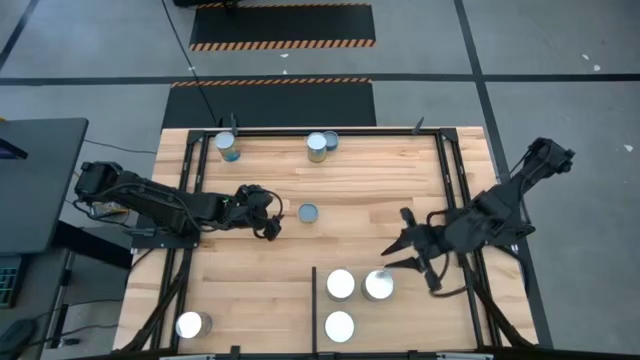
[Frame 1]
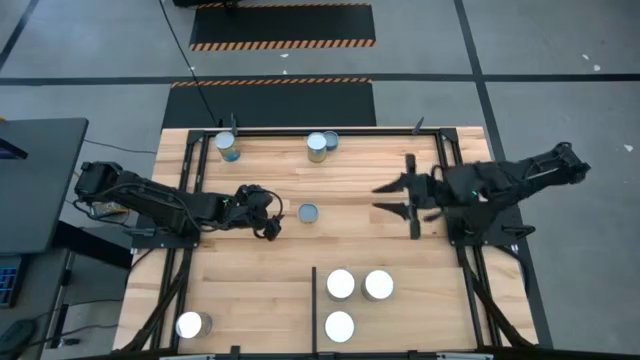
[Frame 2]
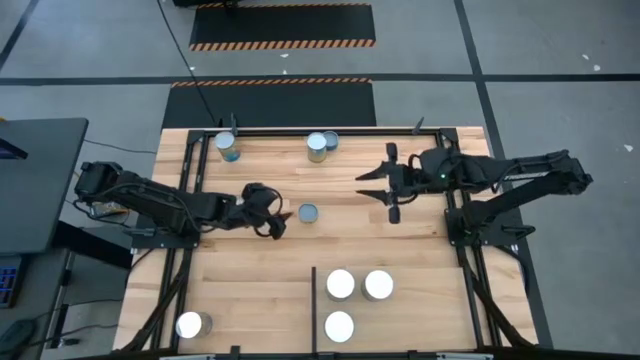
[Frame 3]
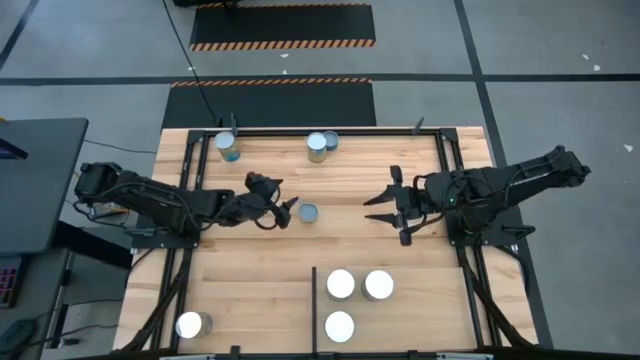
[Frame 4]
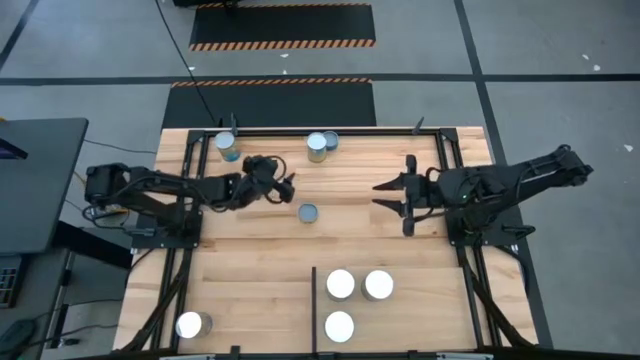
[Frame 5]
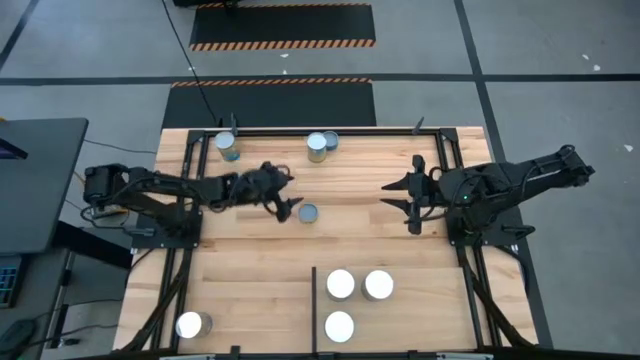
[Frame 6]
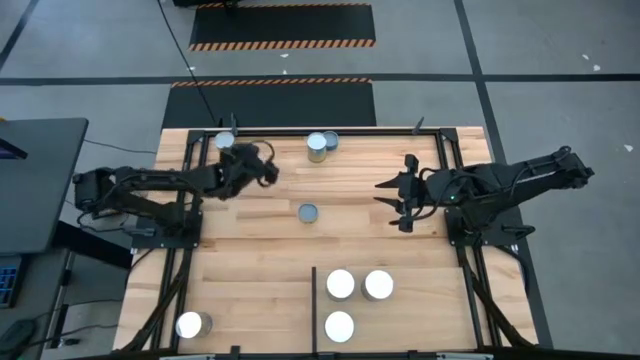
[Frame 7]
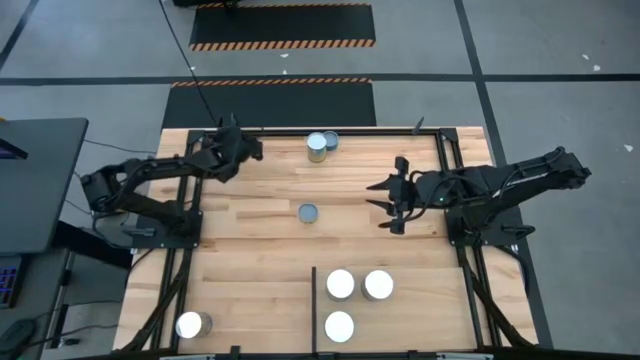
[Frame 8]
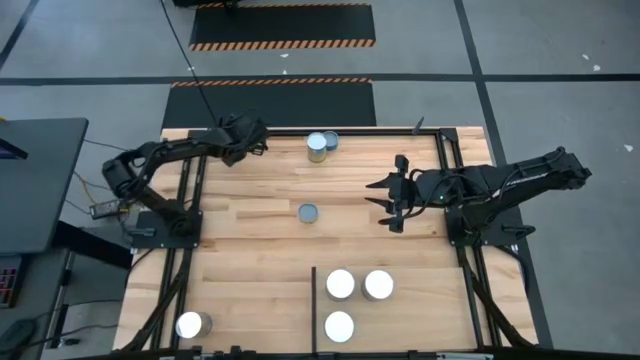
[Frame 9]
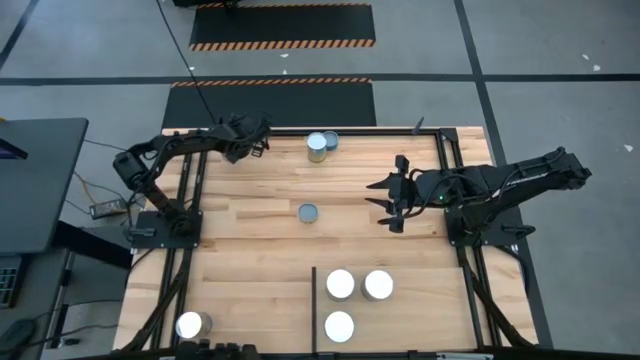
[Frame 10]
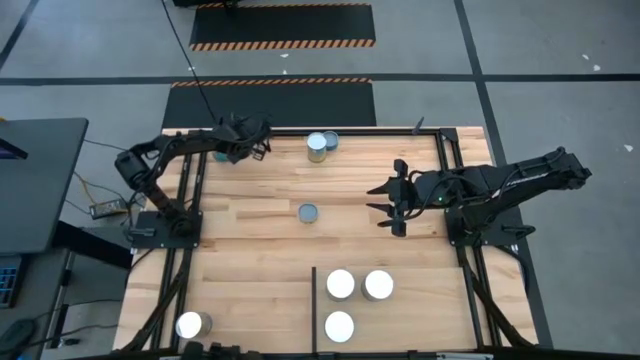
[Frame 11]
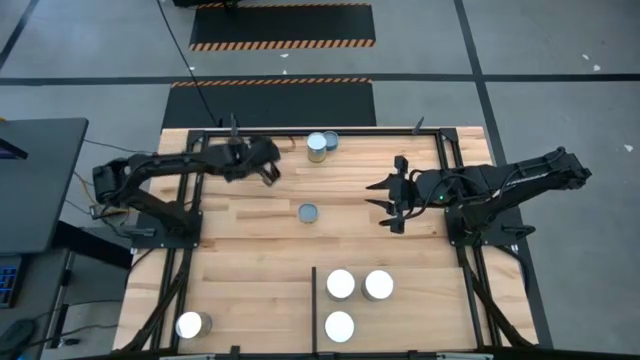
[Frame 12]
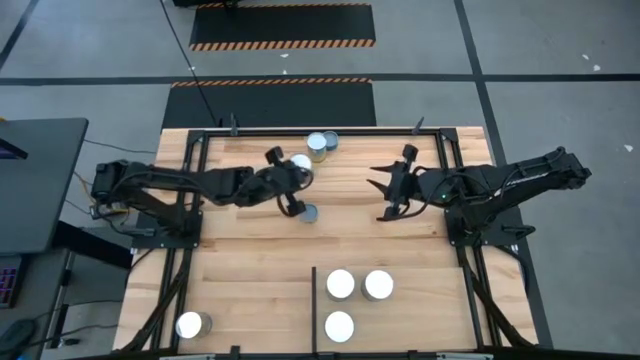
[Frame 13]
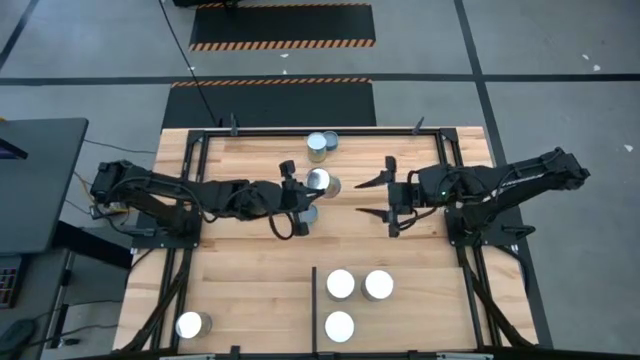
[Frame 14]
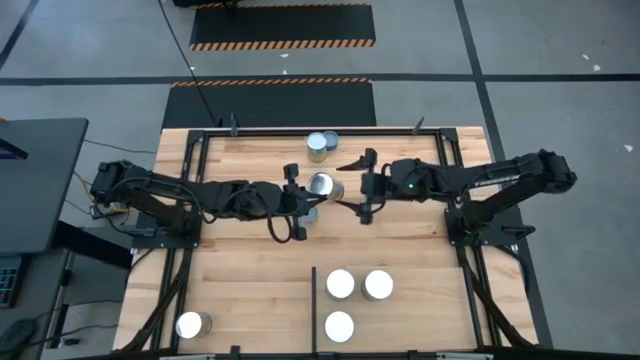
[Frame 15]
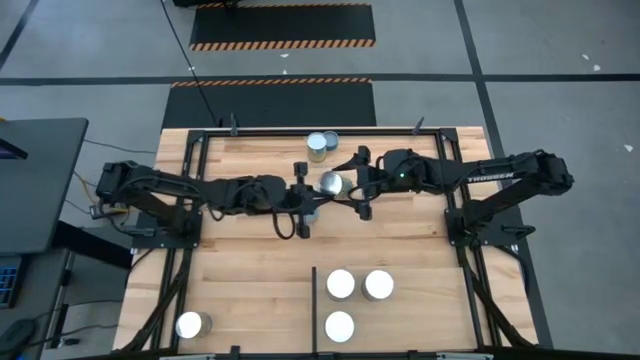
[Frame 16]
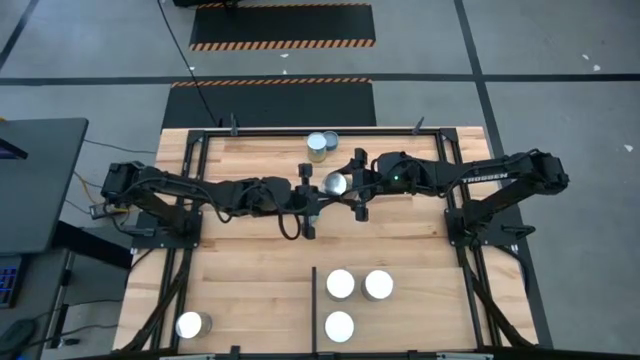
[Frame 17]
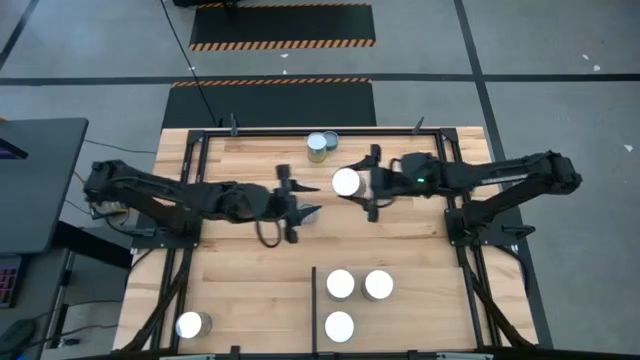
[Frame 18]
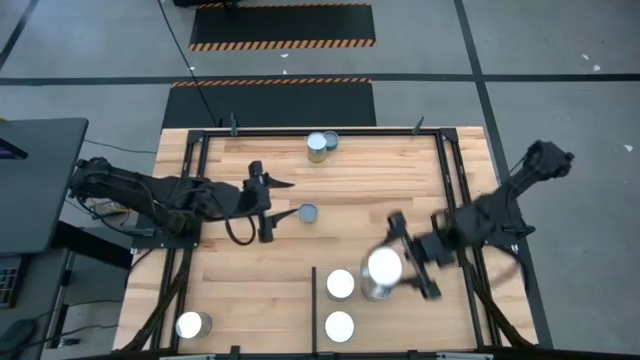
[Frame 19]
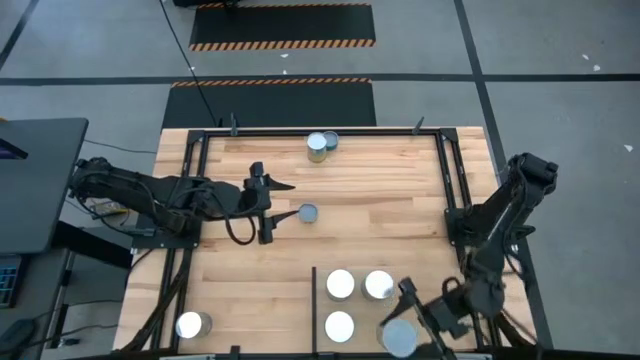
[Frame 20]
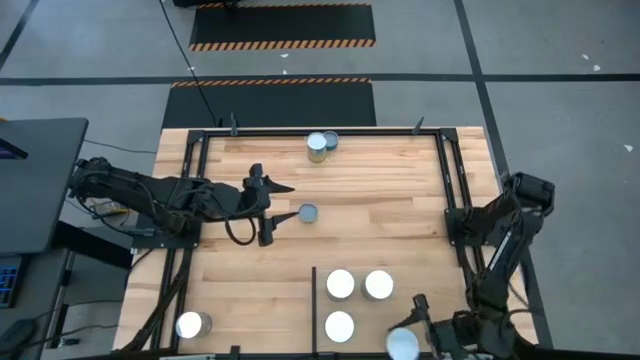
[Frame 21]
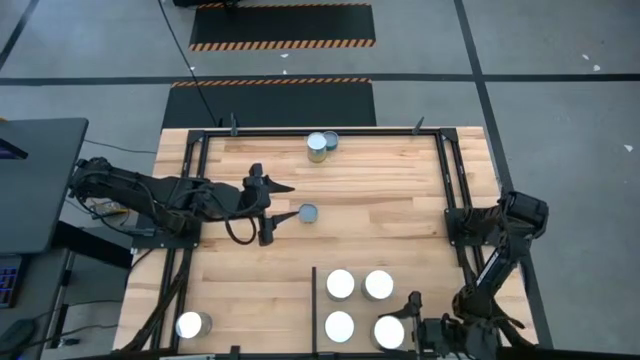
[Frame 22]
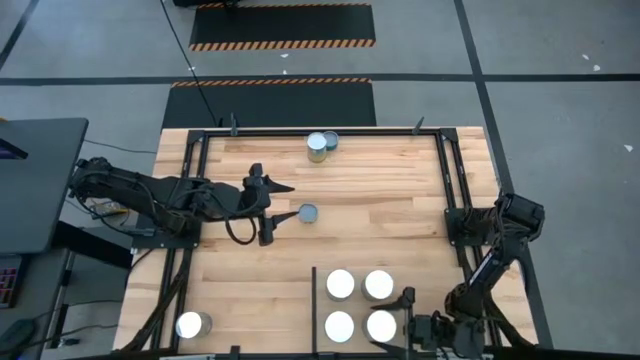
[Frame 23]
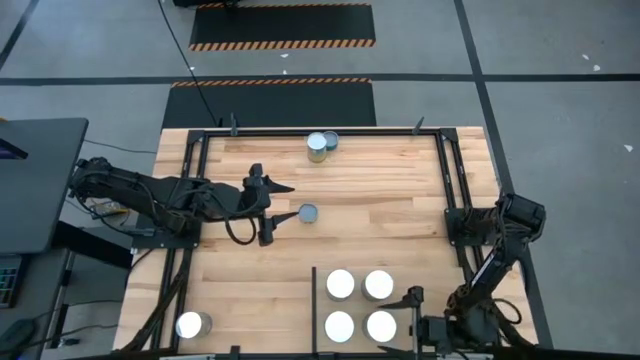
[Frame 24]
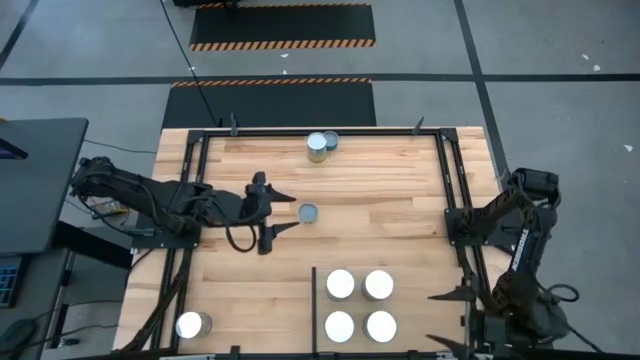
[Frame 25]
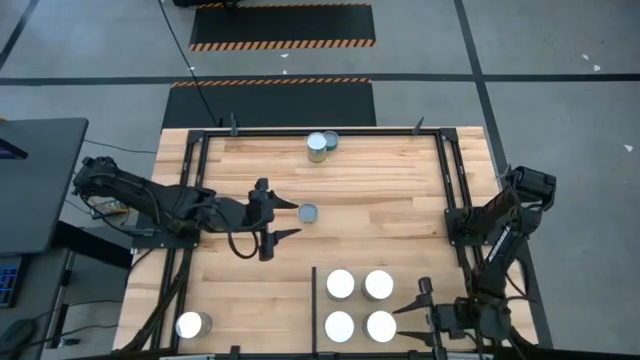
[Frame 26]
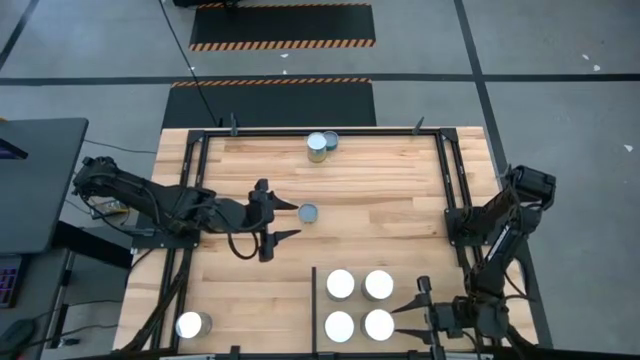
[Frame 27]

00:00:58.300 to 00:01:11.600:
Task: Pick and place cans onto a shelf
Put the canned tomatoes aligned with the other canned tomatoes on the shelf

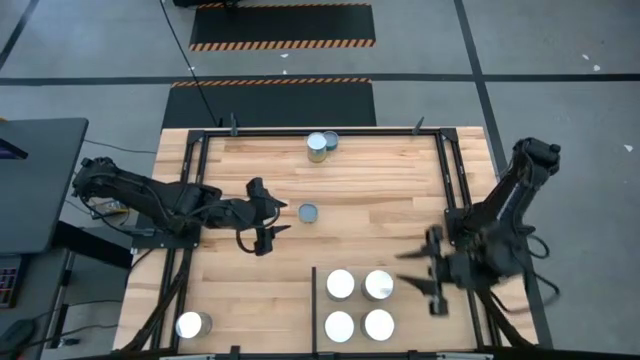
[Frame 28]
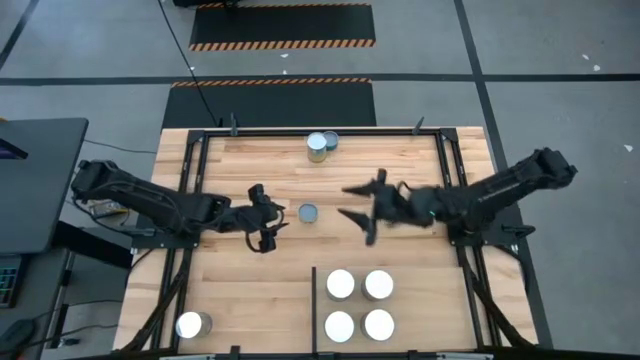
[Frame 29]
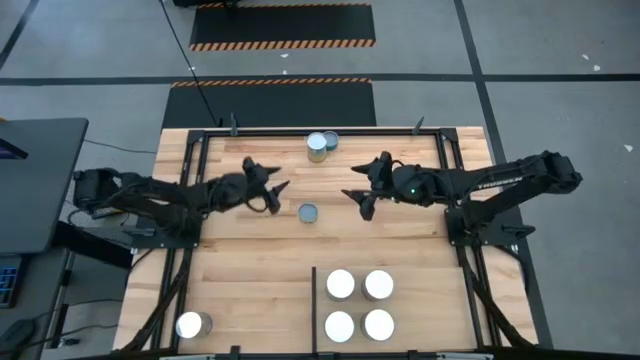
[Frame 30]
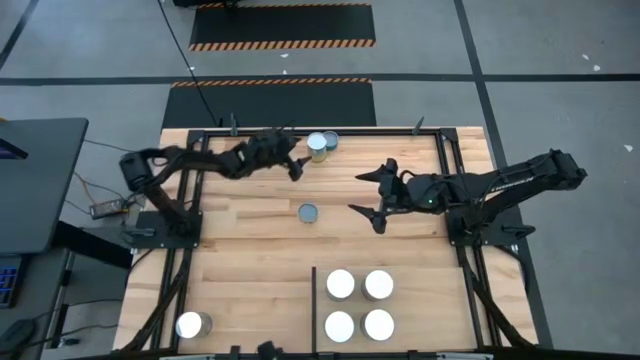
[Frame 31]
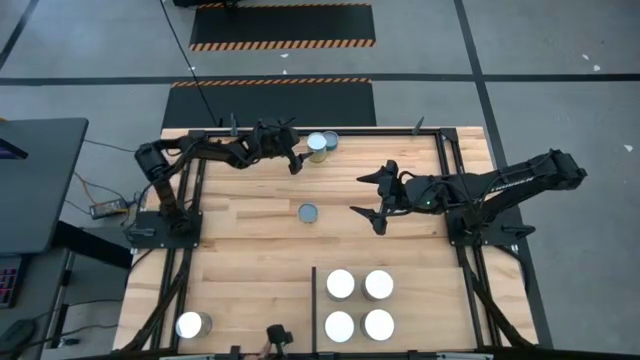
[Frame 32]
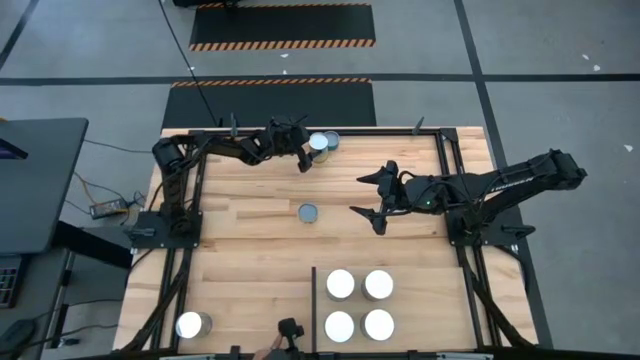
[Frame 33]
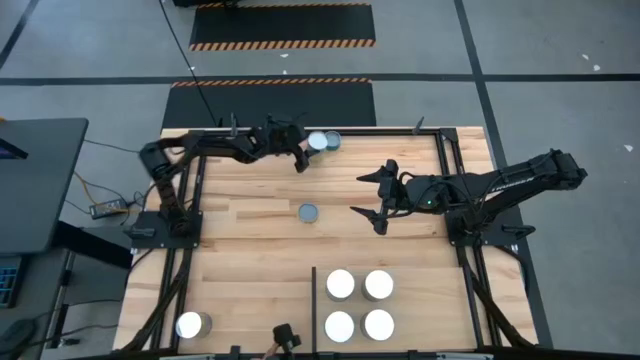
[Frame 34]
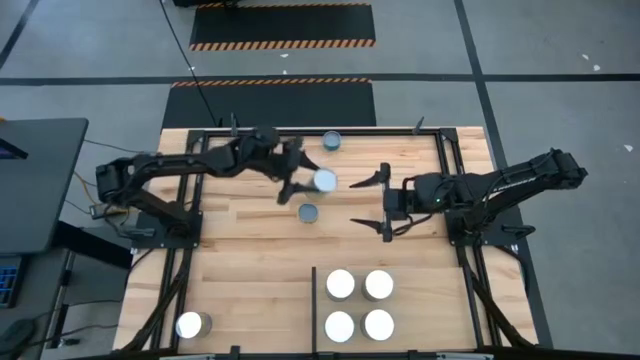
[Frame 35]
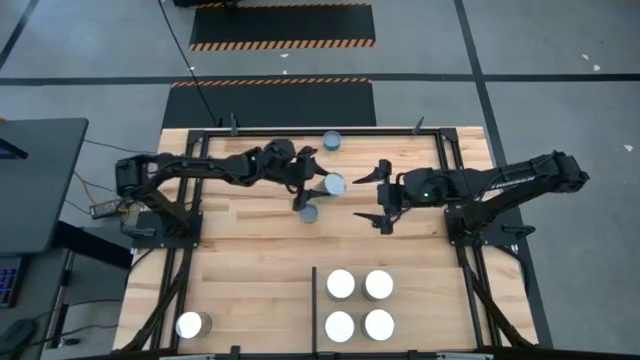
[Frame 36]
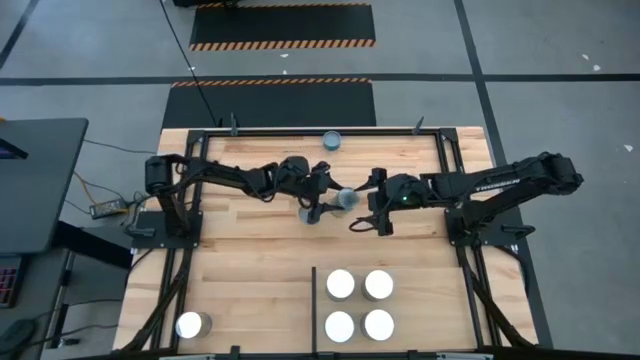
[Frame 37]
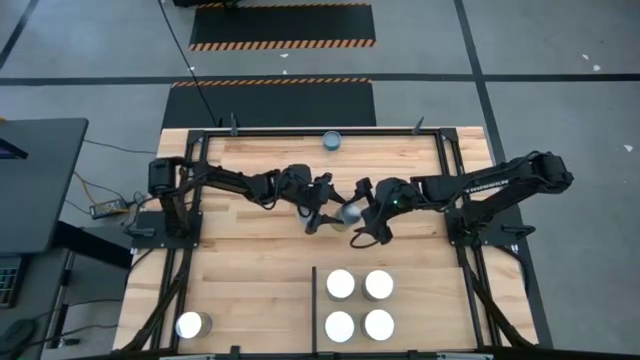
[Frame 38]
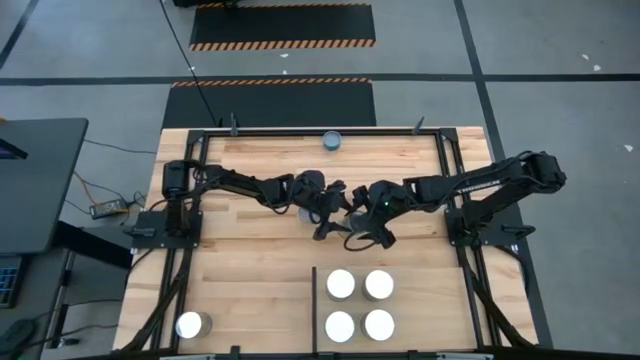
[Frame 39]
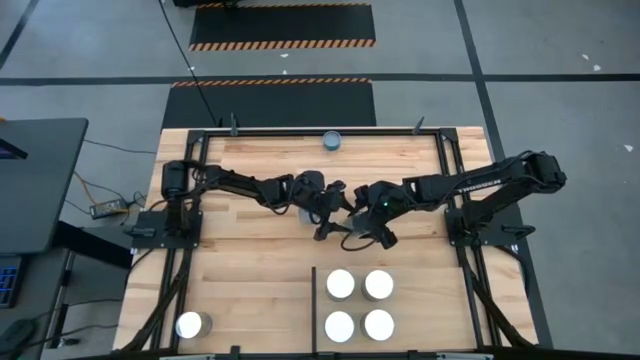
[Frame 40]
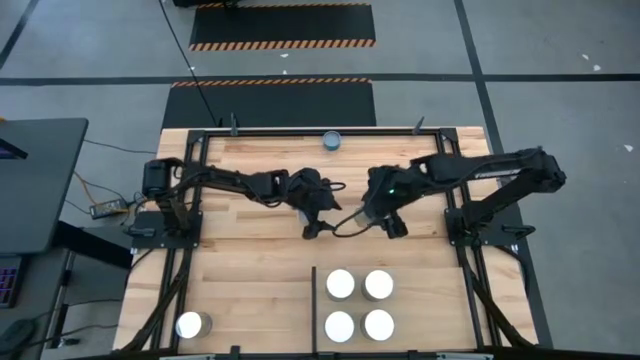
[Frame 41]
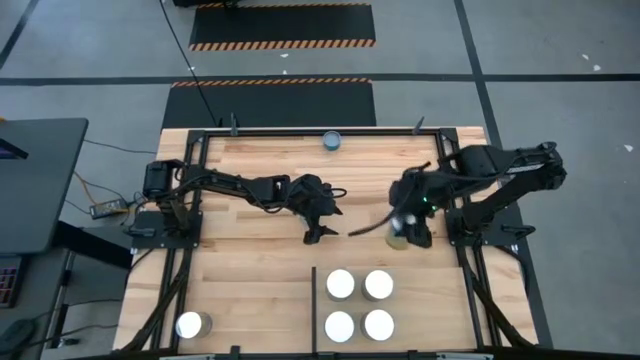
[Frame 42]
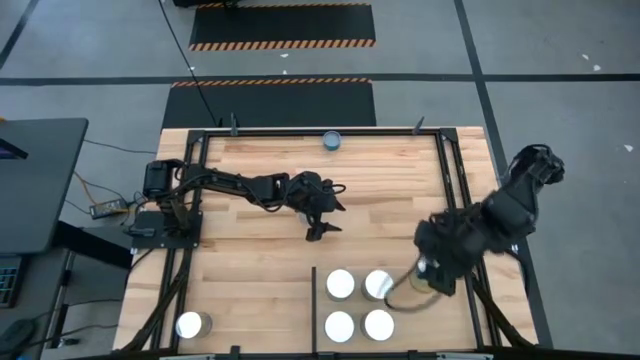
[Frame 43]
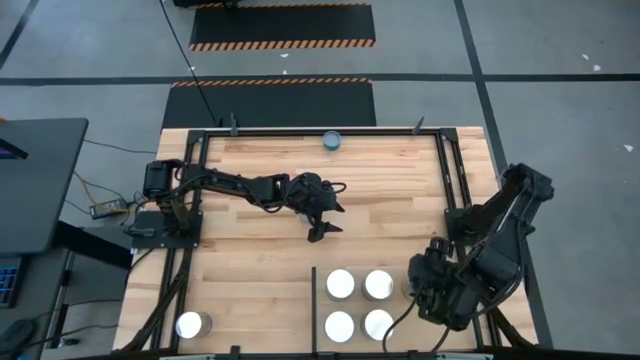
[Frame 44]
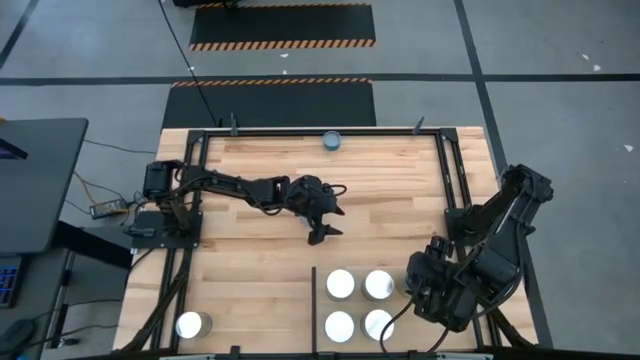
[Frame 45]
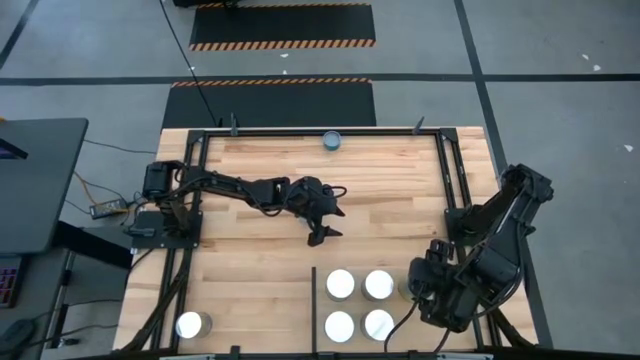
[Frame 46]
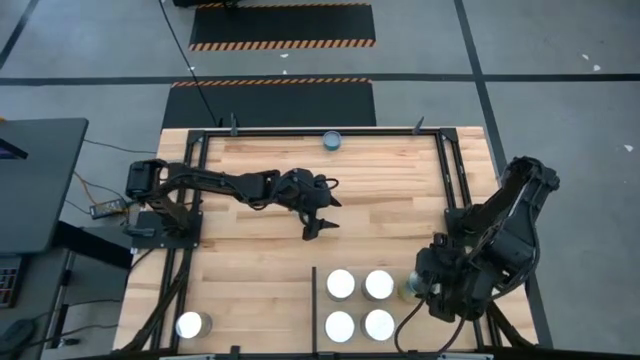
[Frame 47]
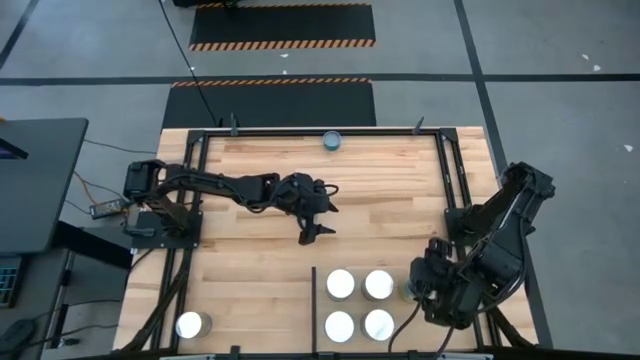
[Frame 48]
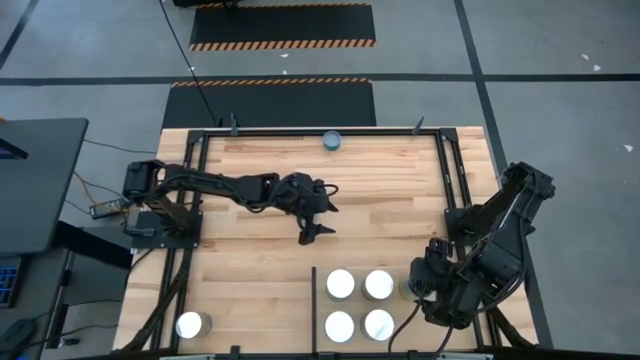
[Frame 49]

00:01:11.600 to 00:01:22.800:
Put the top canned carrots on the shelf
